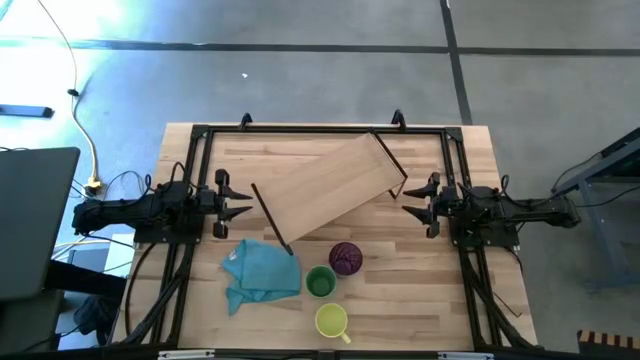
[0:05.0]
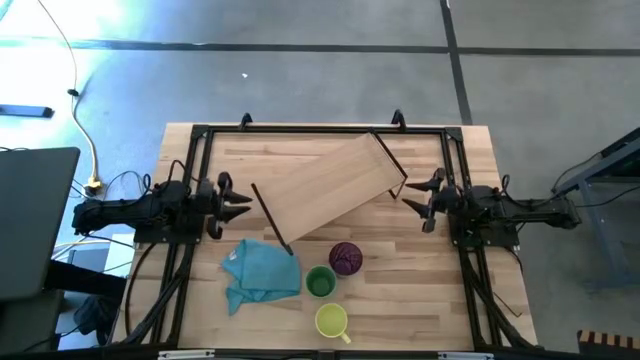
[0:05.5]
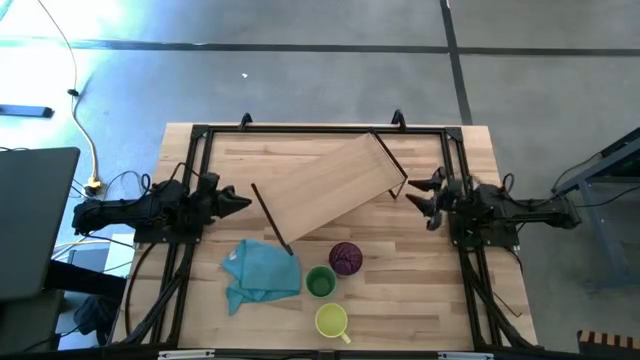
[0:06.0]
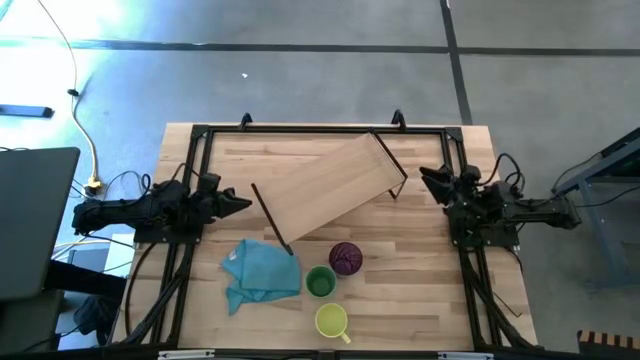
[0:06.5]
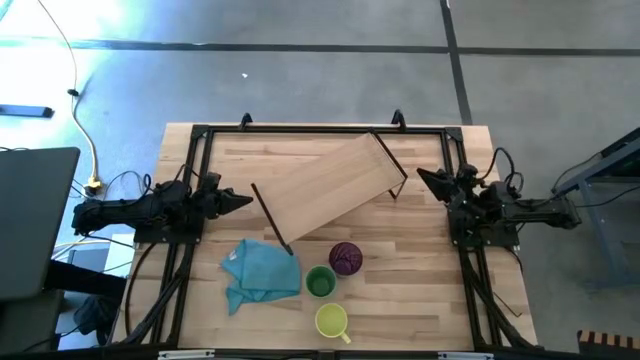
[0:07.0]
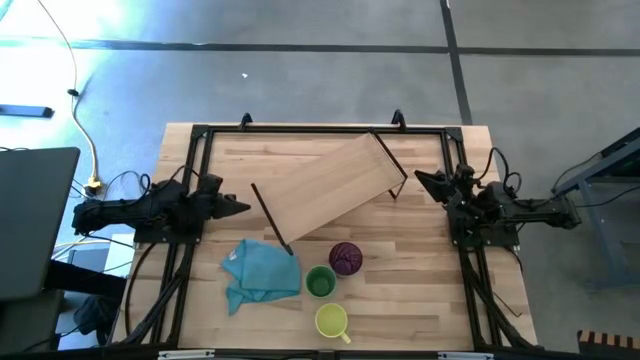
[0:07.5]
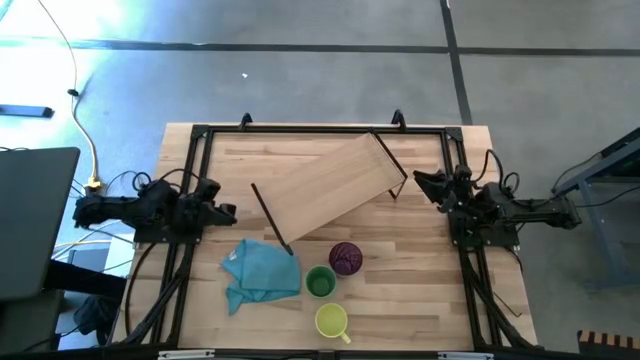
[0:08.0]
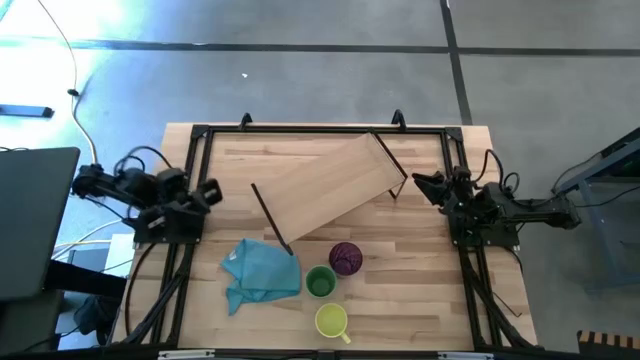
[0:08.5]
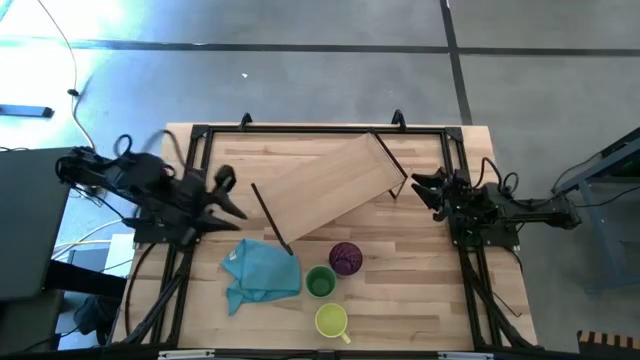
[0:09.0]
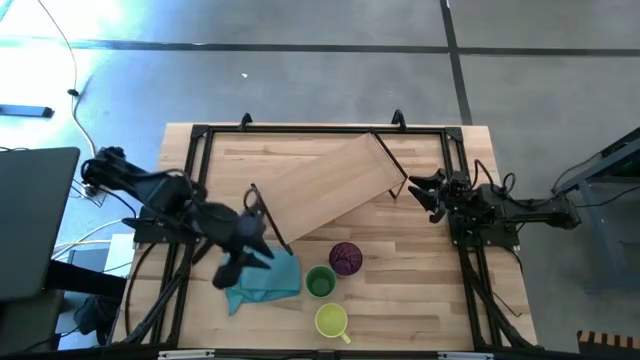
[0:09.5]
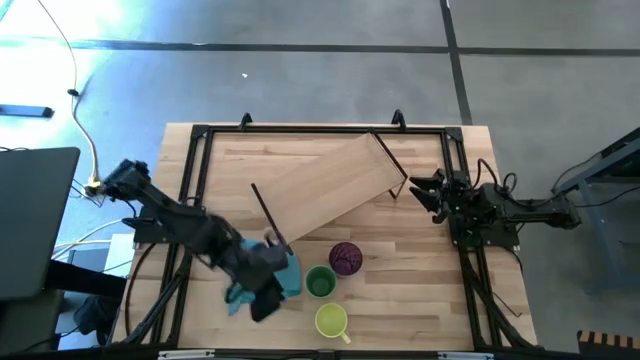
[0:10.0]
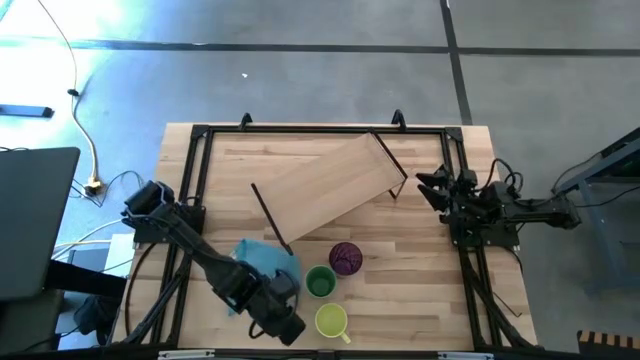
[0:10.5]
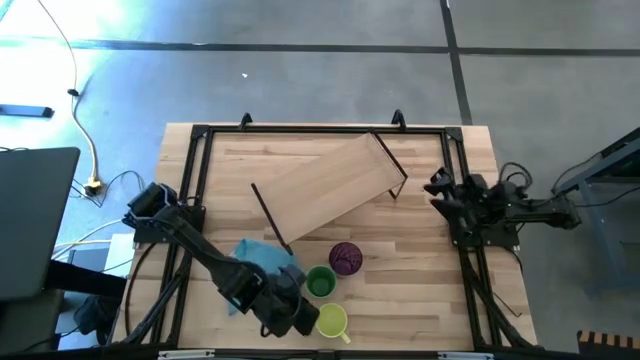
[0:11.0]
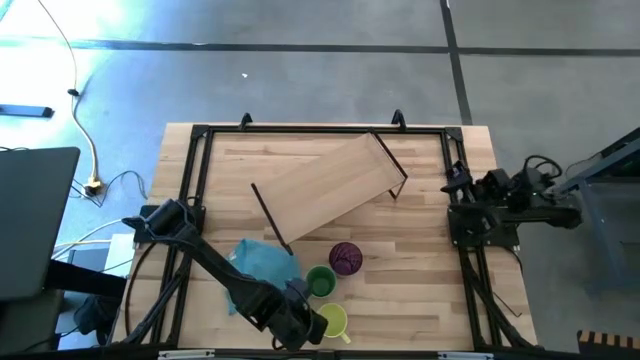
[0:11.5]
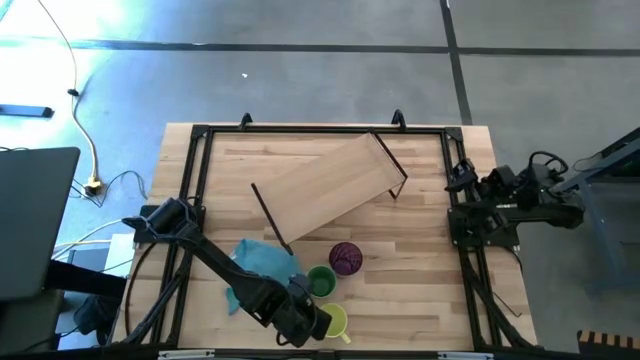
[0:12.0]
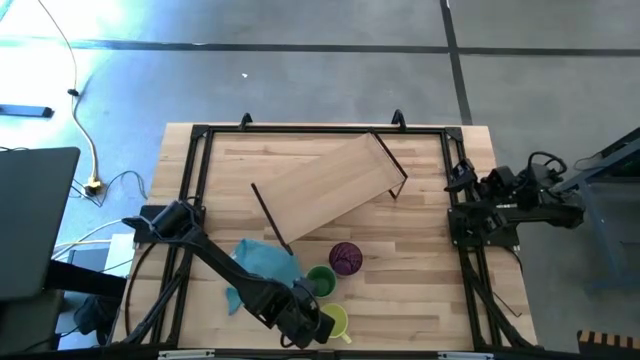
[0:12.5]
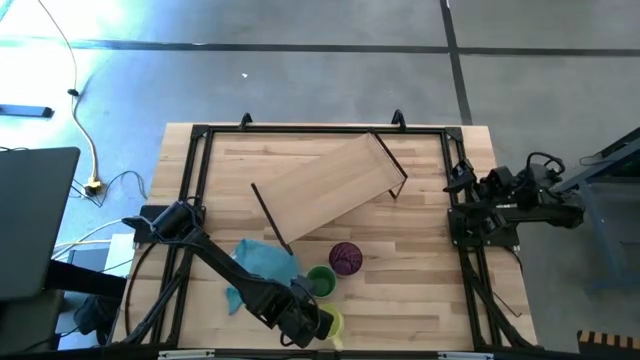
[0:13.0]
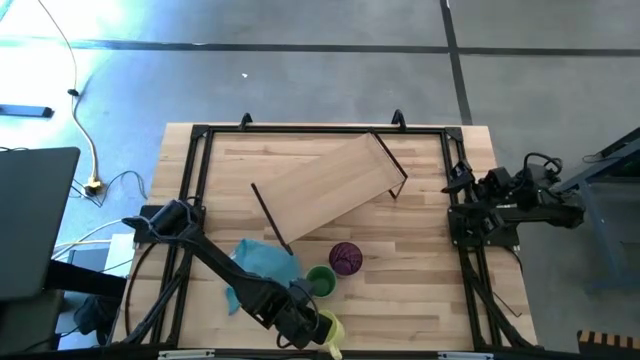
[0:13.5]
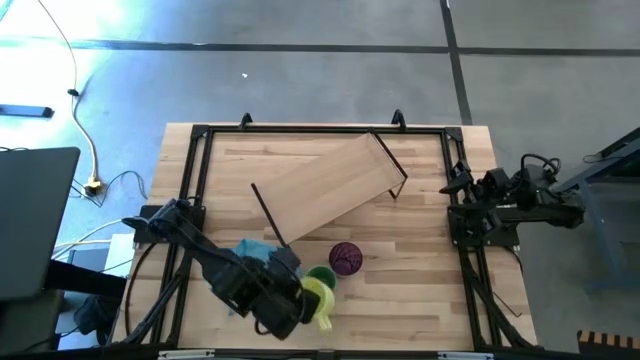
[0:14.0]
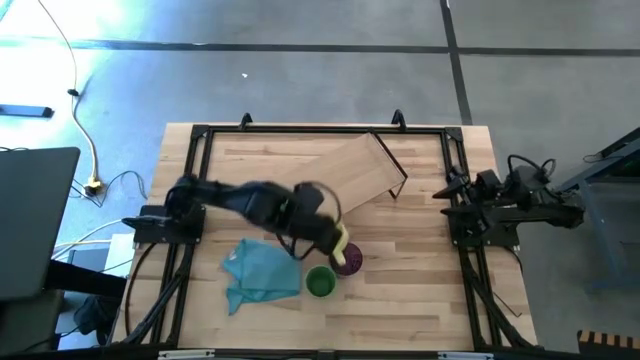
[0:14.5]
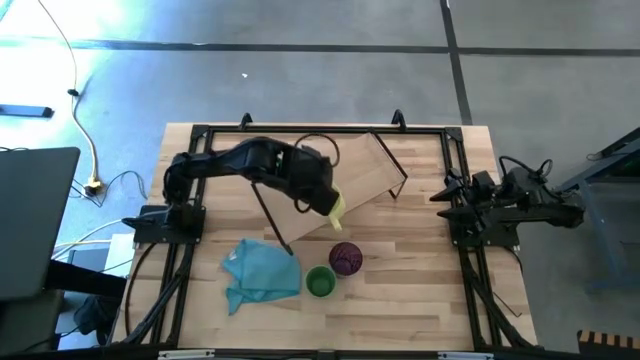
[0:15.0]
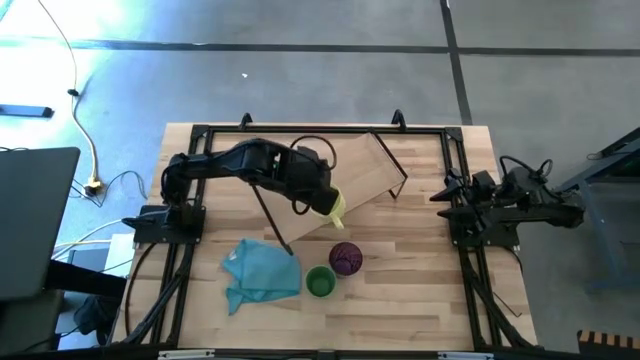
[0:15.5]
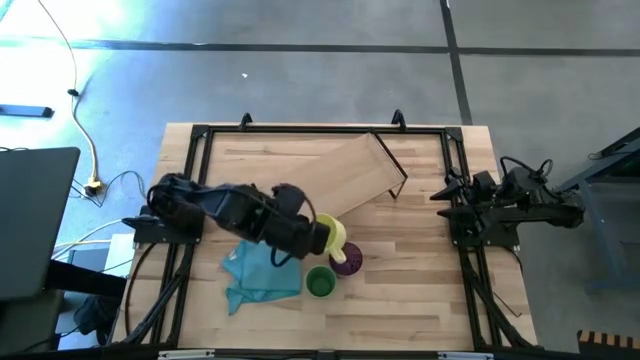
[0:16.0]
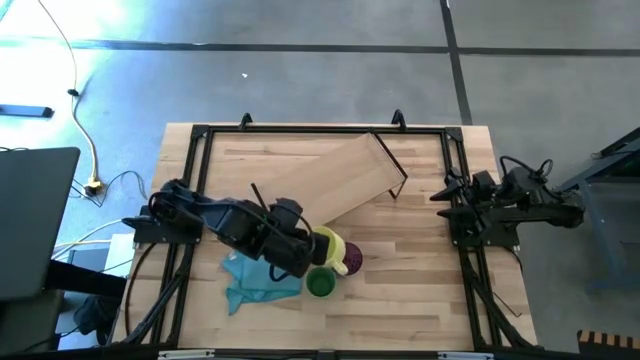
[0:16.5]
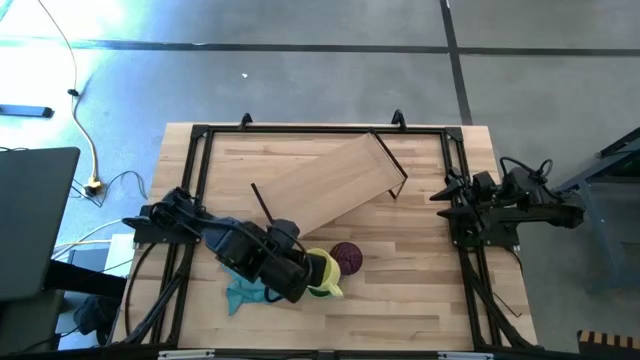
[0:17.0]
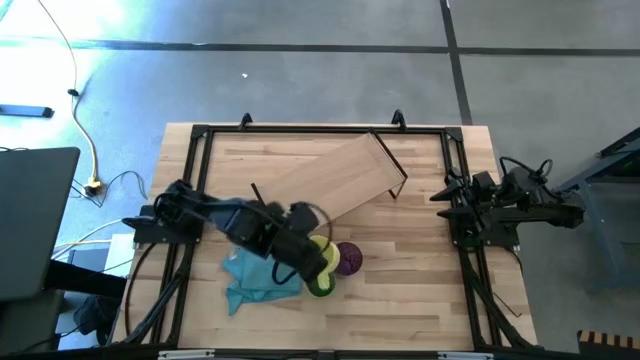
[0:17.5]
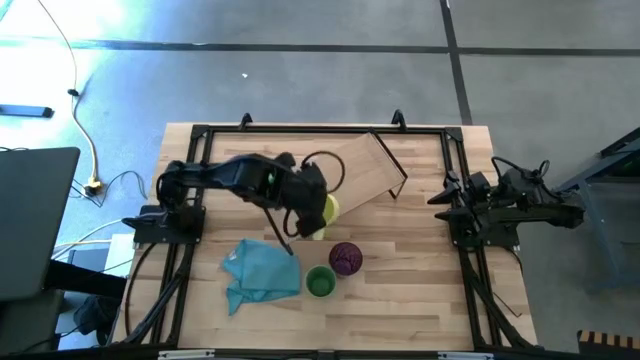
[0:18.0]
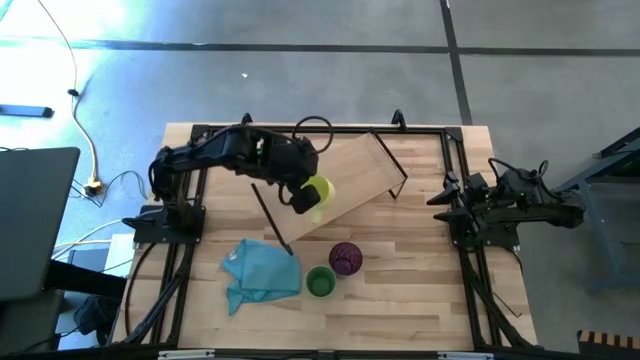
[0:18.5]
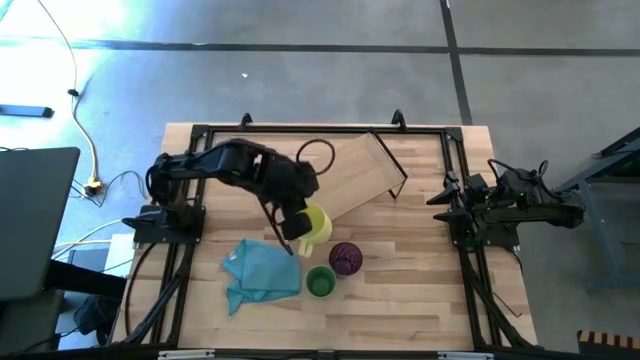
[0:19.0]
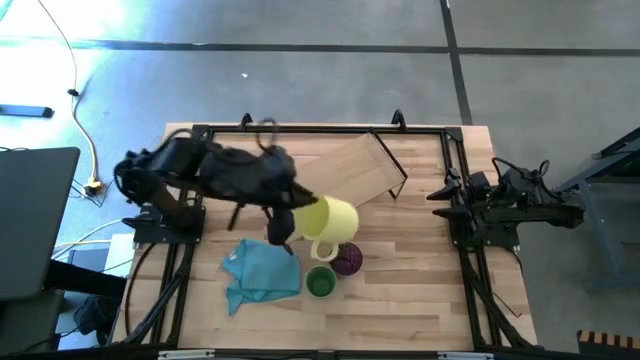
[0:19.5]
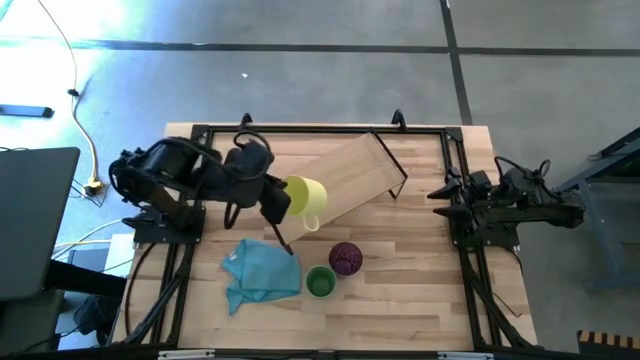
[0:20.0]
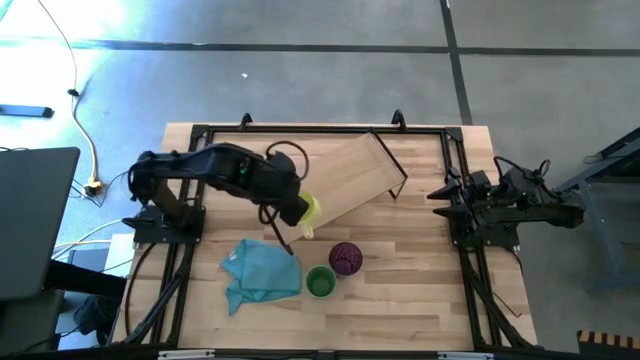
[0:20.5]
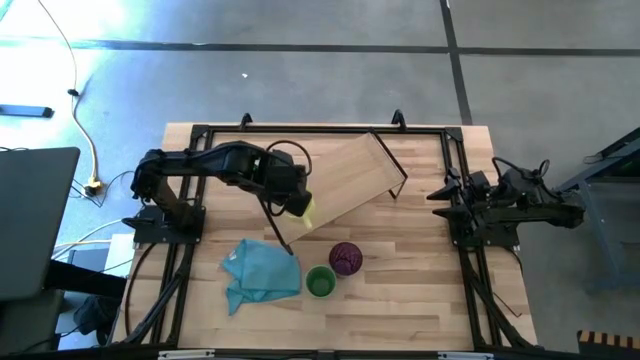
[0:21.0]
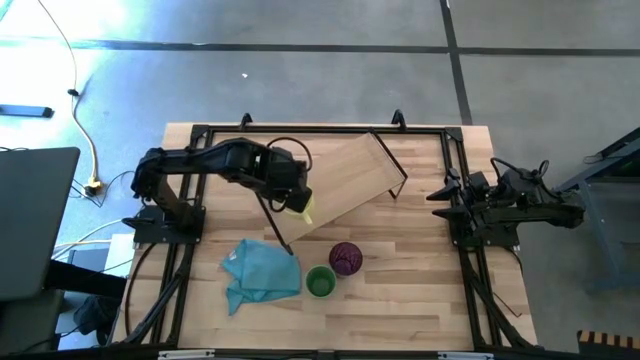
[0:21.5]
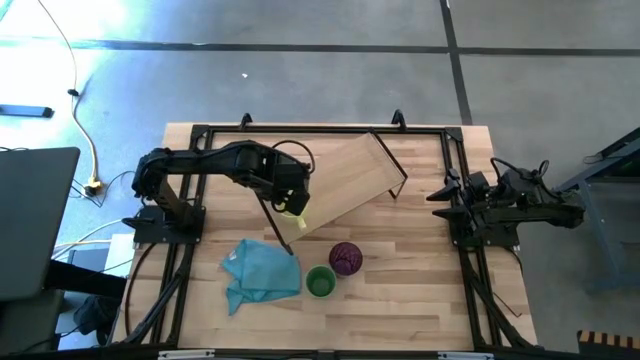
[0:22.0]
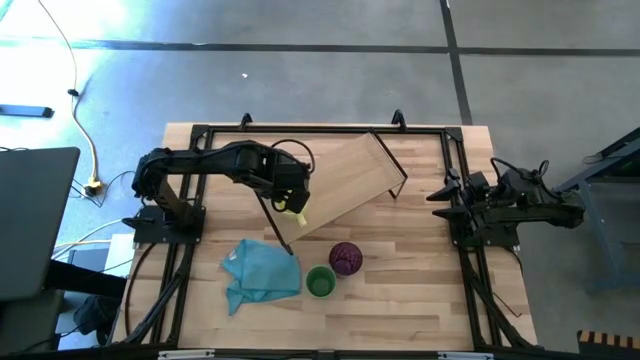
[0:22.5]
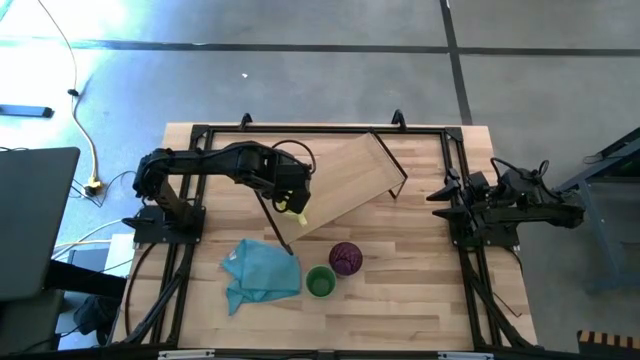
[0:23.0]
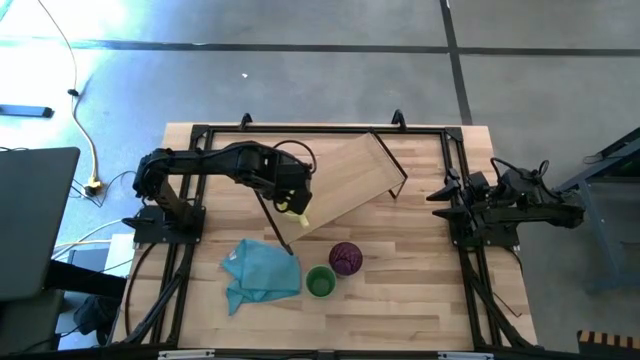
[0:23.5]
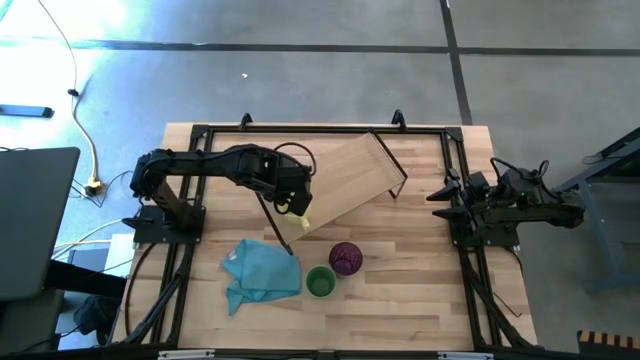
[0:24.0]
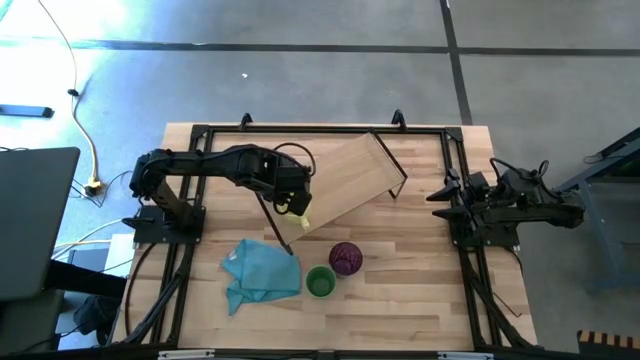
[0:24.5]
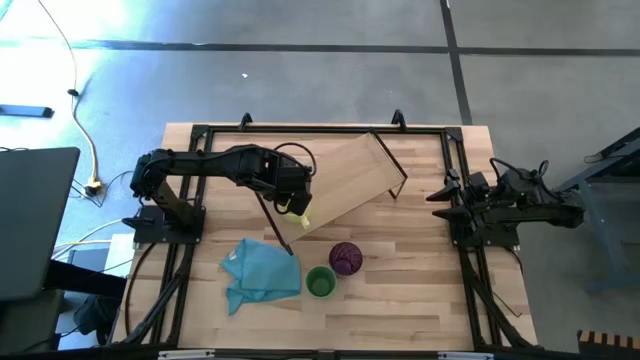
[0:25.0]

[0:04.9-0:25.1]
Task: Stack small to large cups/mugs on shelf
Put the yellow cup on the shelf
